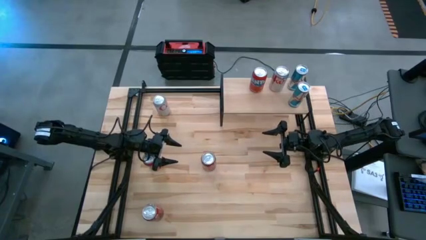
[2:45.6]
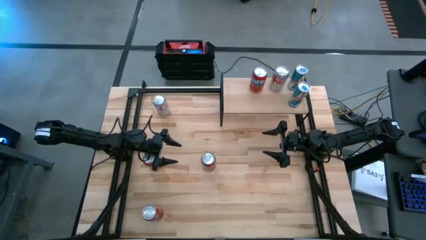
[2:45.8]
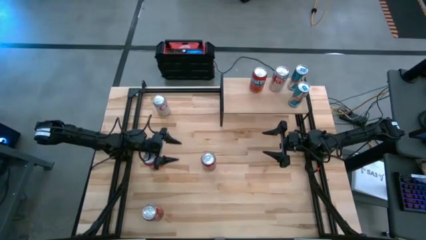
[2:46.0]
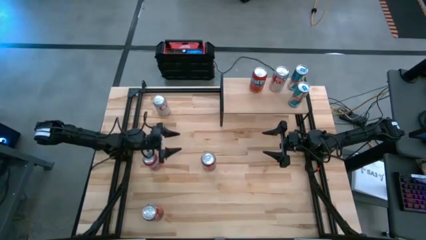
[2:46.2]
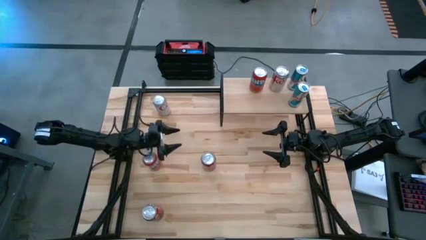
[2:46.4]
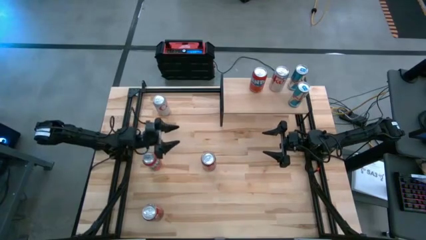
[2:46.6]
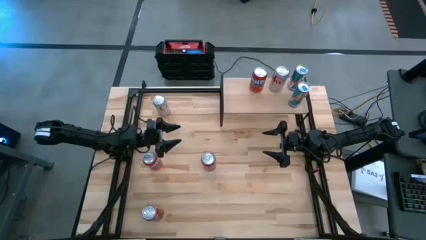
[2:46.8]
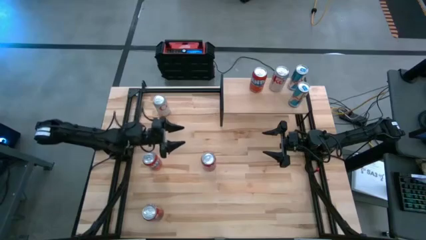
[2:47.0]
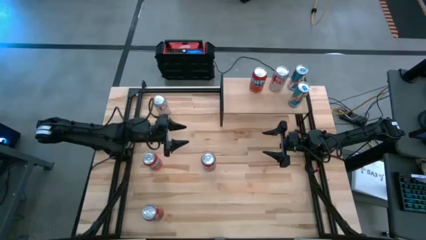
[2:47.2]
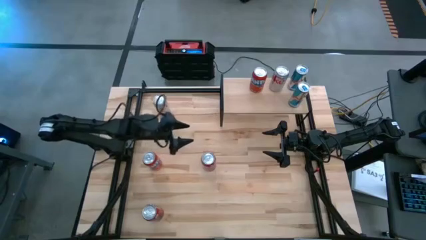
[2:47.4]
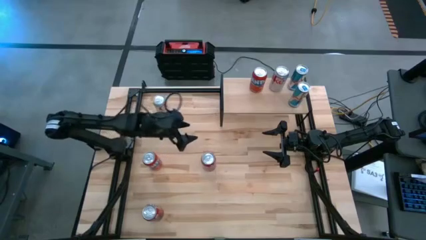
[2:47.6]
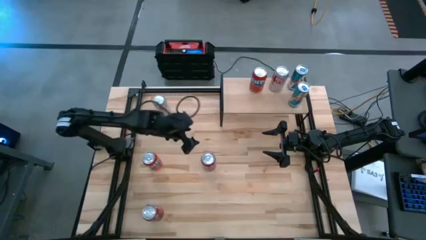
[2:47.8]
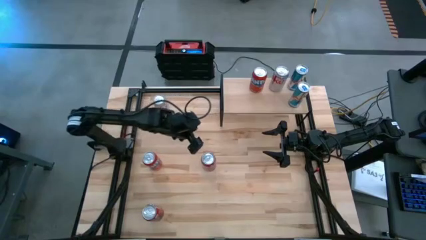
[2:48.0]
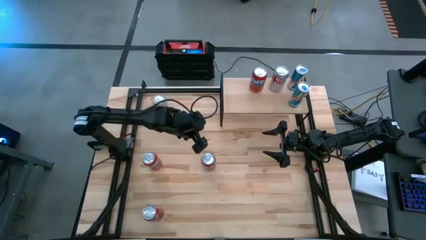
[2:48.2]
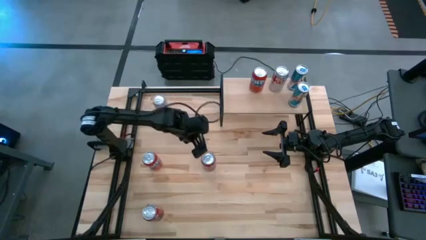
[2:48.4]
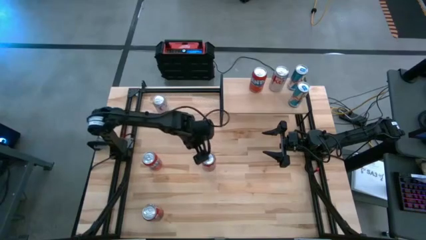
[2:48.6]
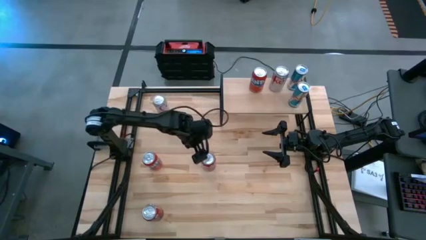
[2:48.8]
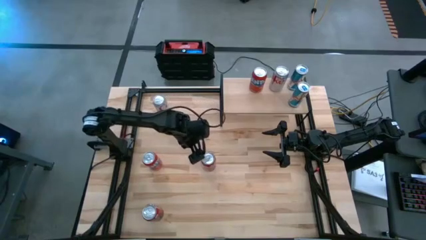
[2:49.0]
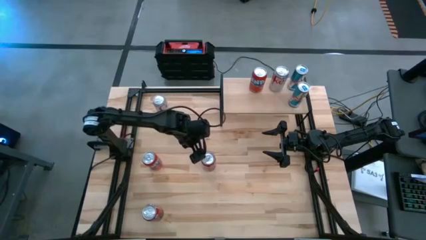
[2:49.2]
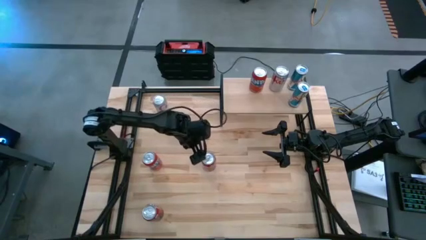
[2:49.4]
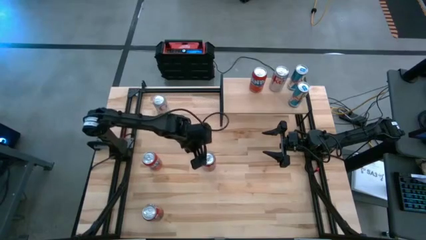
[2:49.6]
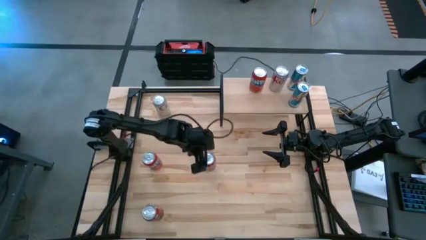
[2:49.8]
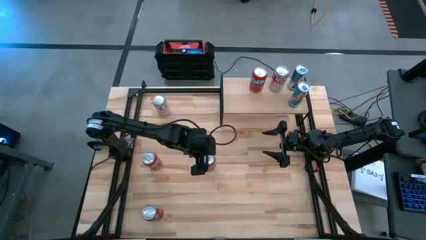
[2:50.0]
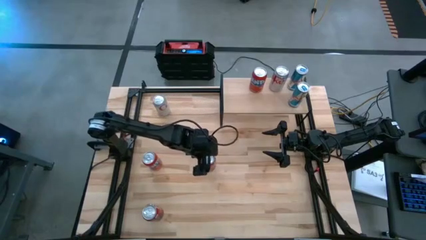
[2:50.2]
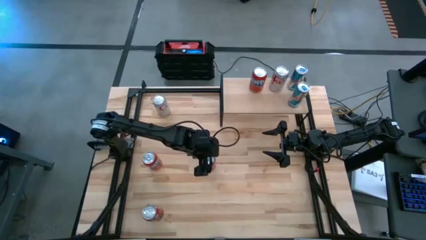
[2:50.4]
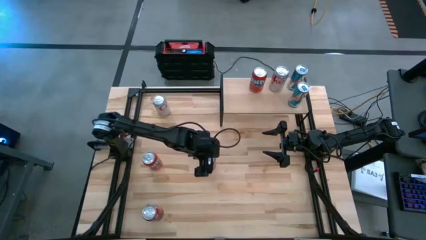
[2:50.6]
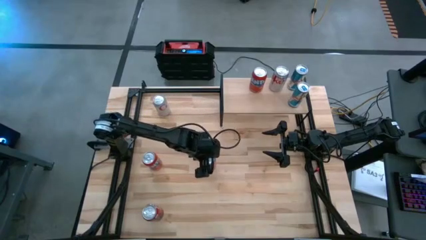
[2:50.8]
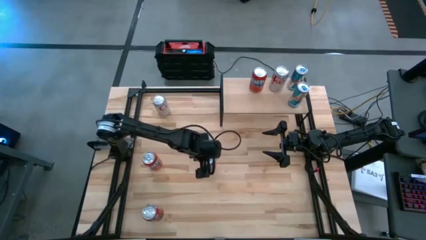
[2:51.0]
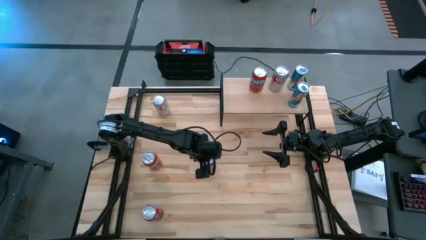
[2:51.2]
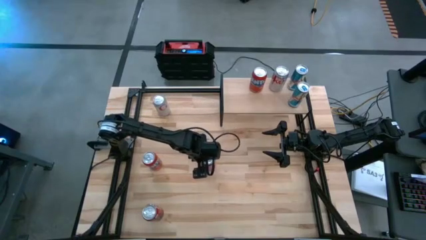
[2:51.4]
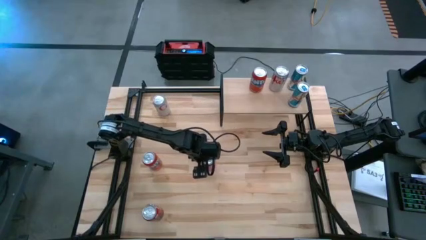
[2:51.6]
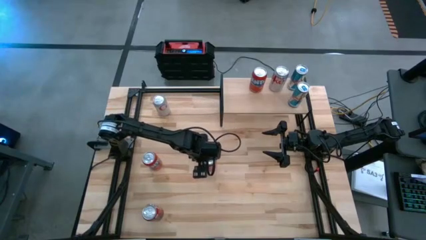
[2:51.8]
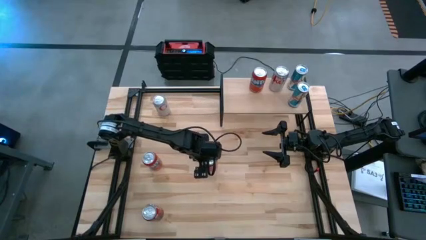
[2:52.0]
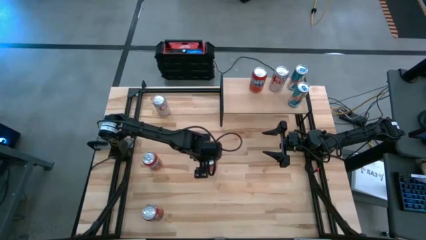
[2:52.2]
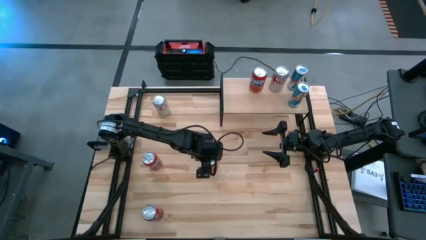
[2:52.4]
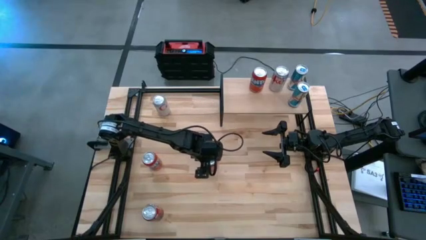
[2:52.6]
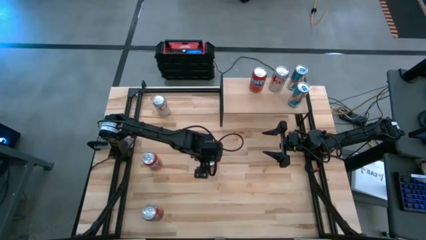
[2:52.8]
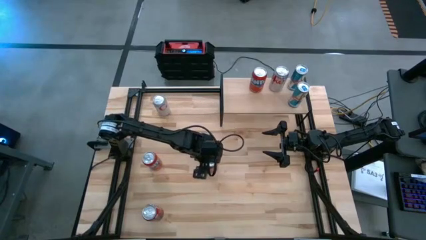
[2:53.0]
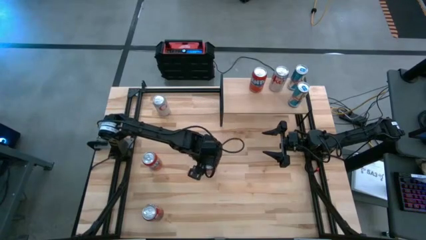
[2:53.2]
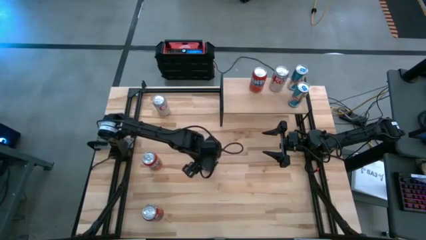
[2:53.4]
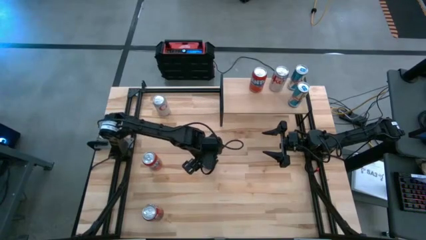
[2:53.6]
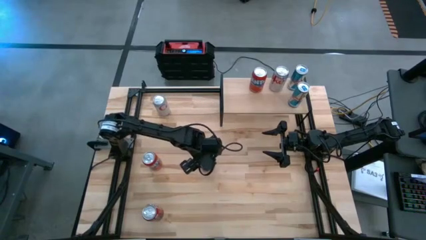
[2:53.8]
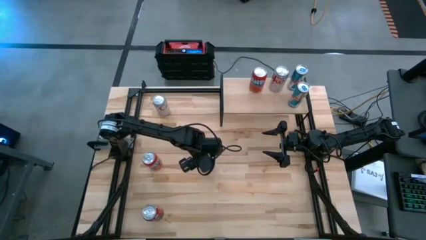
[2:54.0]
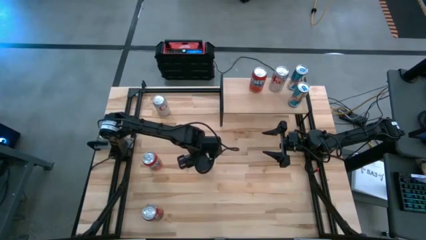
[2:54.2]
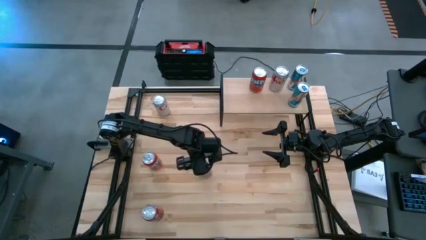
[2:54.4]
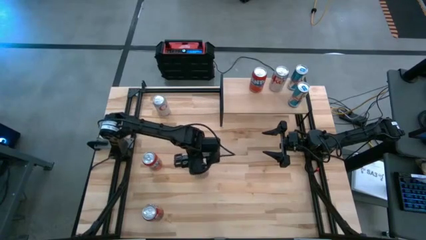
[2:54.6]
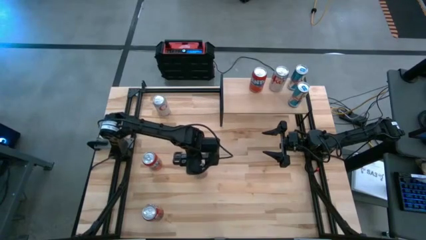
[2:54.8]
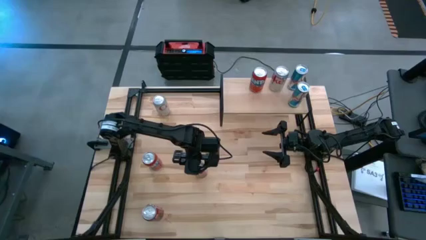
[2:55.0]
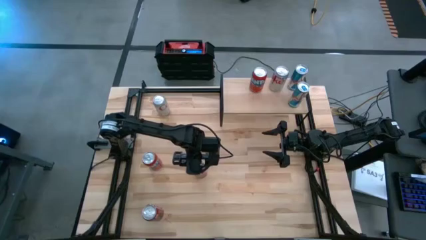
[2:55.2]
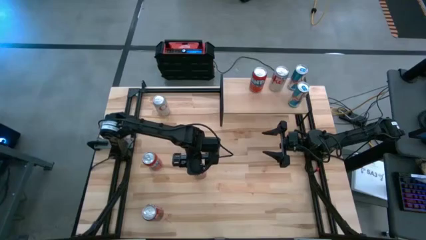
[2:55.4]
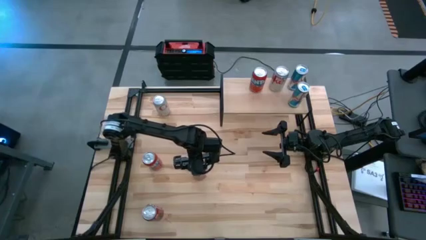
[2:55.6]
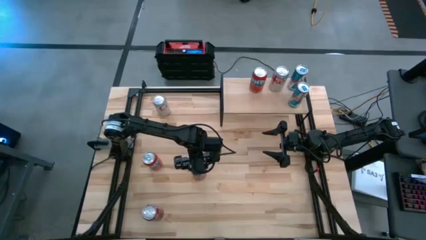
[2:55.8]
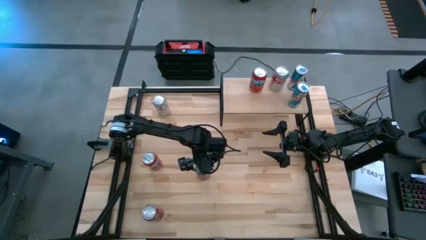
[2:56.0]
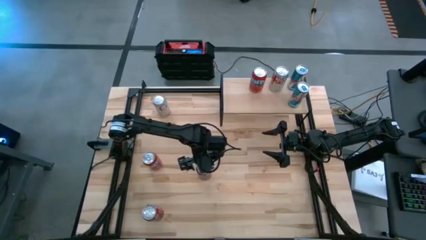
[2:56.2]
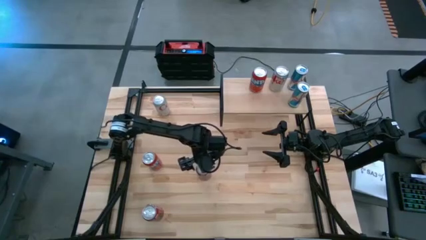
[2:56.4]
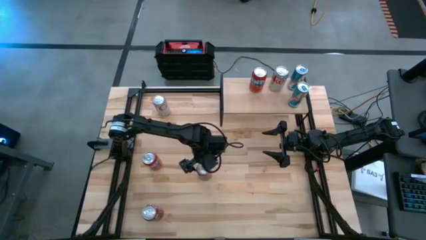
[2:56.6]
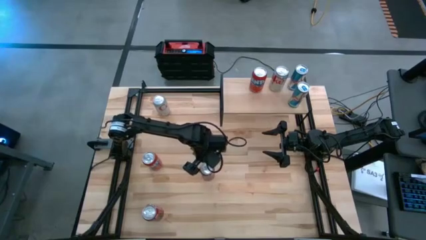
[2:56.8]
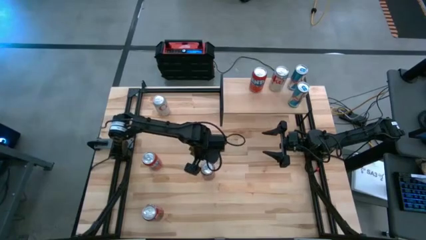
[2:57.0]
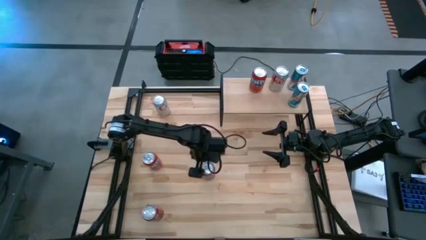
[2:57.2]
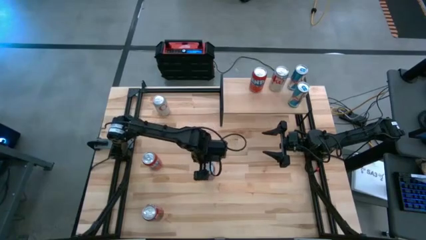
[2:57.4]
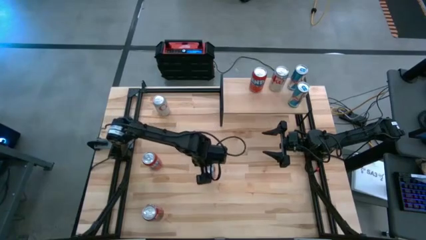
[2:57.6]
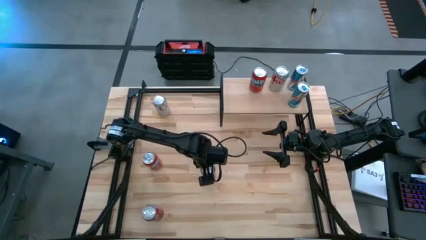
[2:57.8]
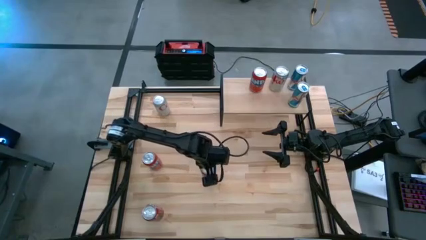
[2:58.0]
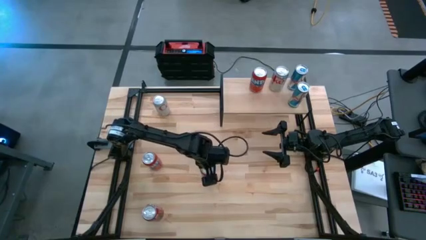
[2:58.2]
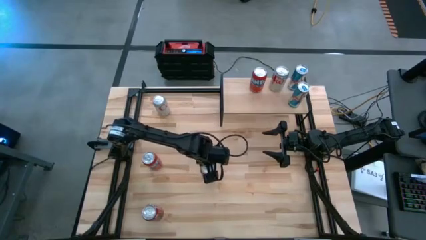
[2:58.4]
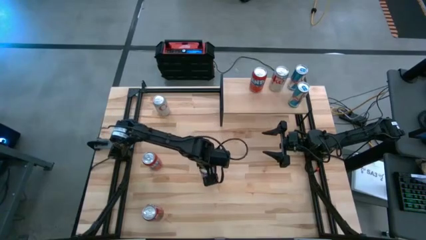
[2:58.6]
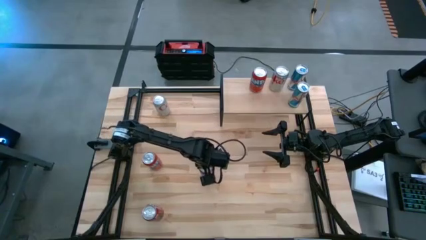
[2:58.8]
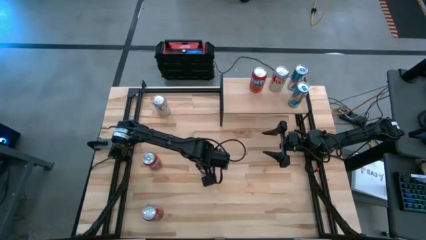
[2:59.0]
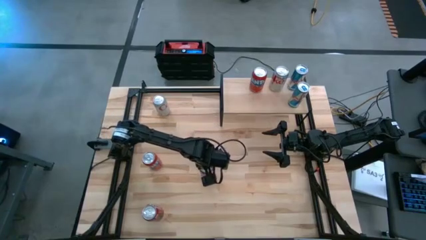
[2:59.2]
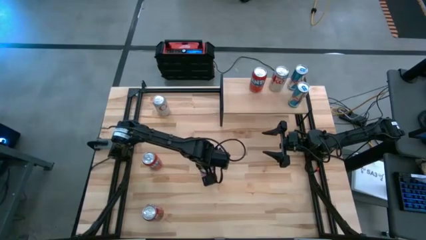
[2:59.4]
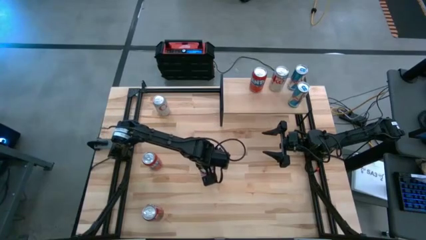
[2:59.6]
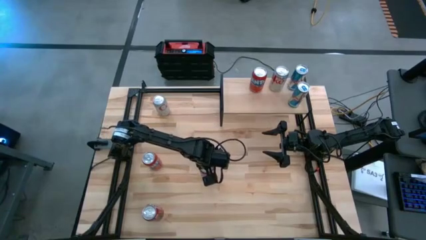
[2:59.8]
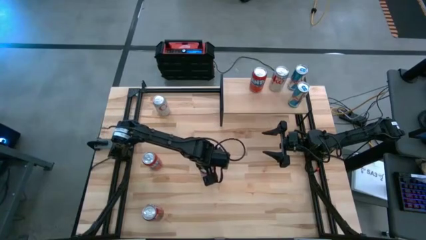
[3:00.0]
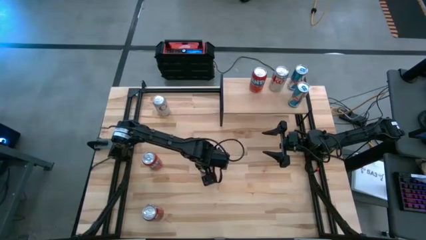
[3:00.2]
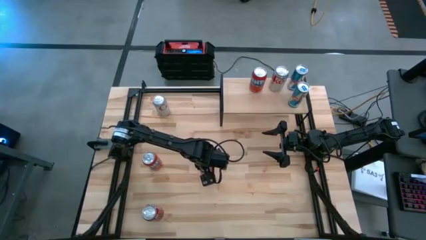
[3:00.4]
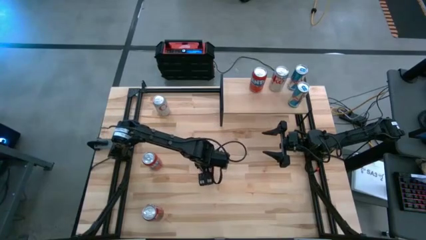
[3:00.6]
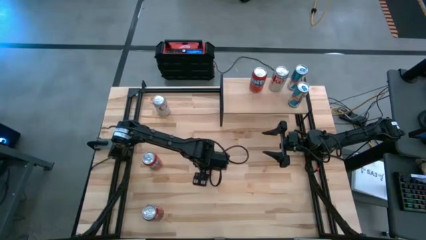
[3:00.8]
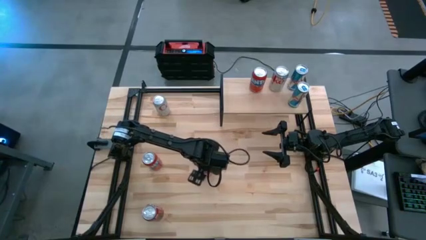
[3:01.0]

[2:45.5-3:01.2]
Task: Place canned beverage on shelf
Put the top red white soda can on the shelf

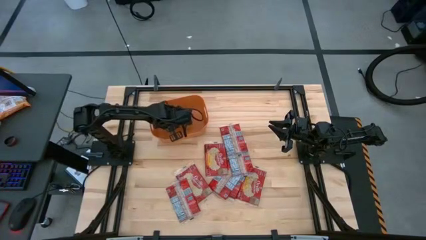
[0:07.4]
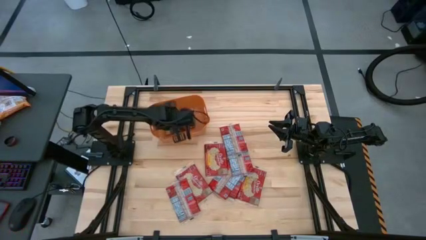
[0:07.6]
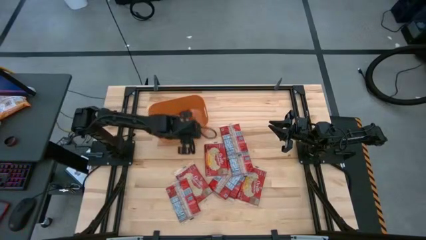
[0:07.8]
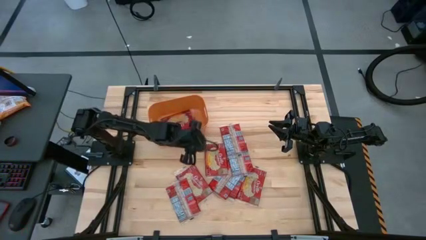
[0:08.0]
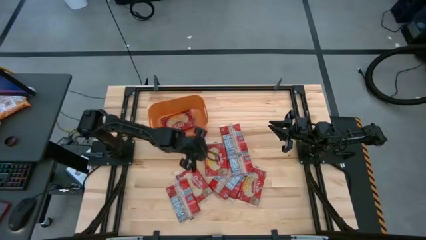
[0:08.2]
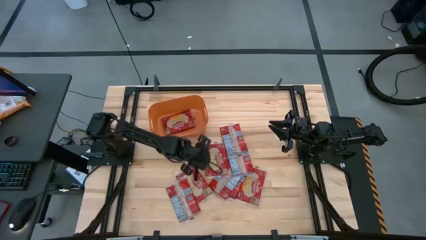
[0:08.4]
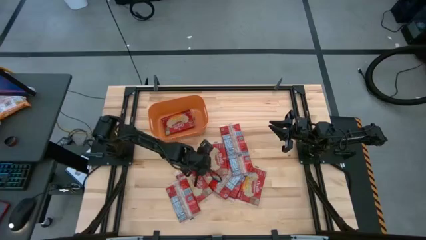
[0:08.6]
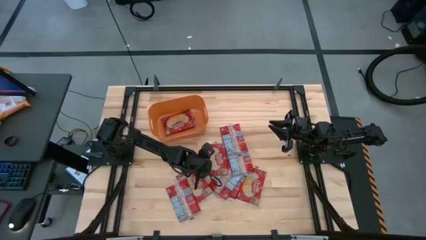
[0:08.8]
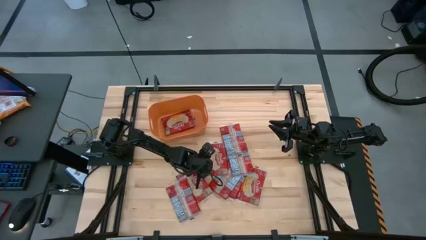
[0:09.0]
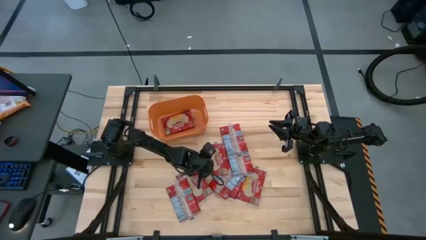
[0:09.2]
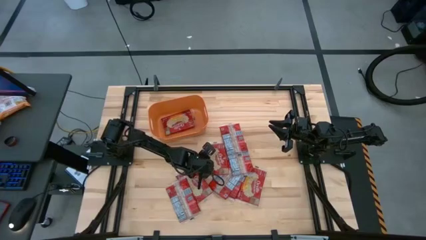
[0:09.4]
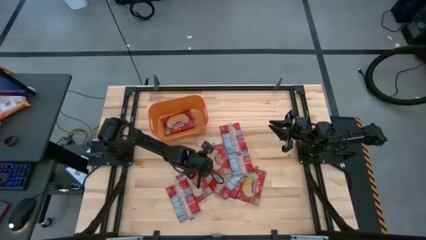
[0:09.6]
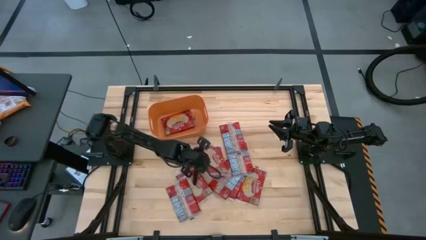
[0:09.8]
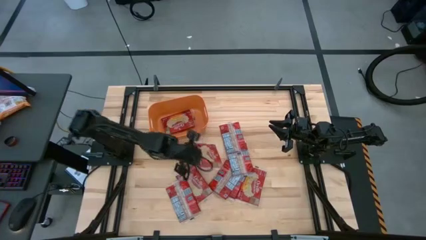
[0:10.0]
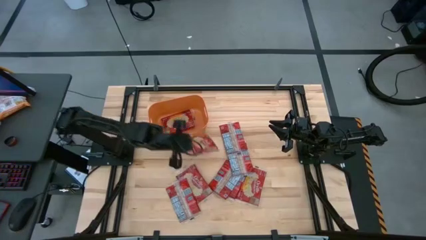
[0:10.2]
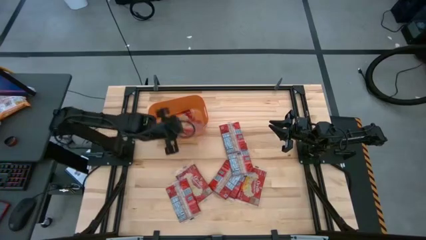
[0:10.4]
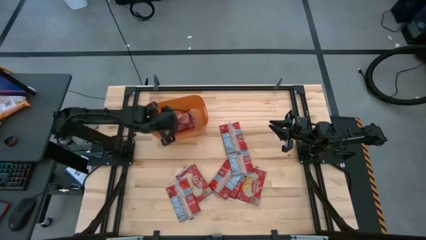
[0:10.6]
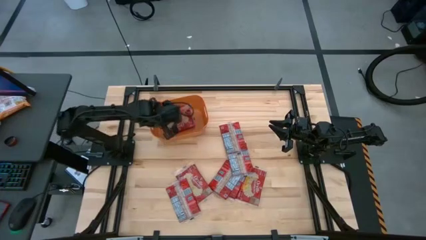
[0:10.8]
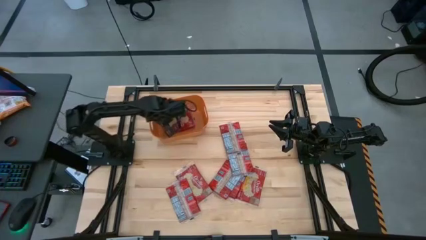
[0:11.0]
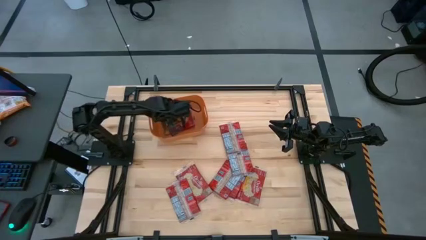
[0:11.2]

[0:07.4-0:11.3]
Task: Sort popcorn bags into baskets
Put the red popcorn bag into the orange container
